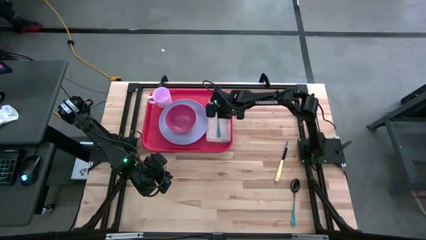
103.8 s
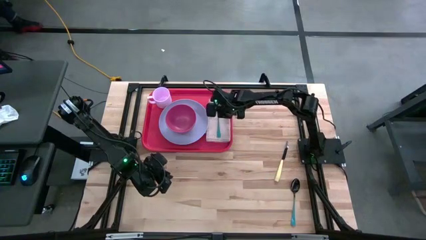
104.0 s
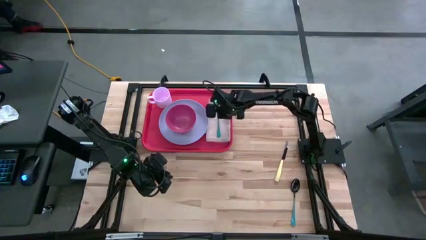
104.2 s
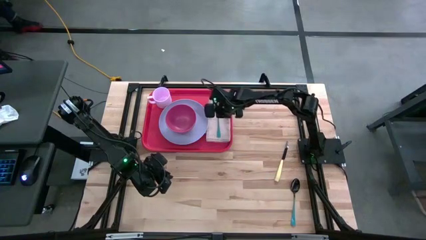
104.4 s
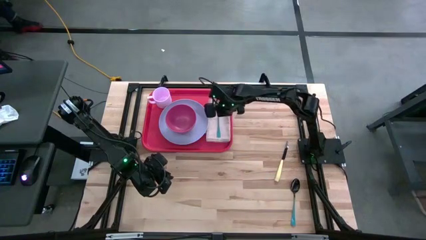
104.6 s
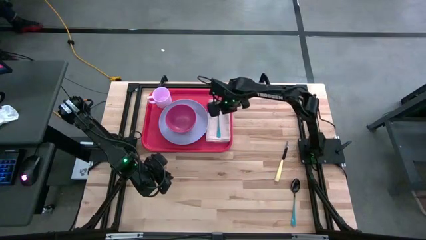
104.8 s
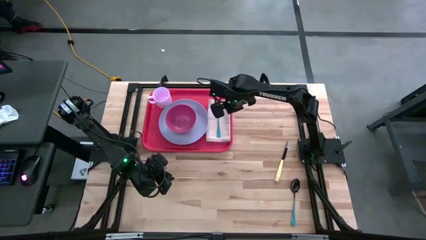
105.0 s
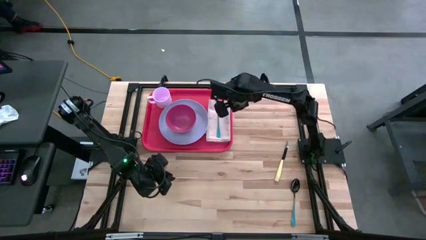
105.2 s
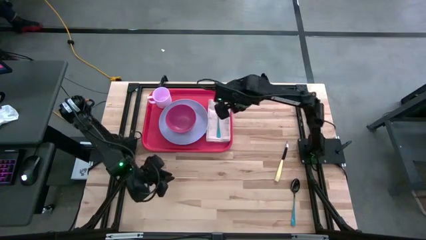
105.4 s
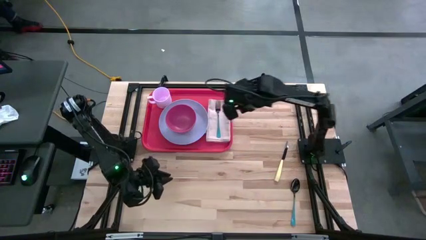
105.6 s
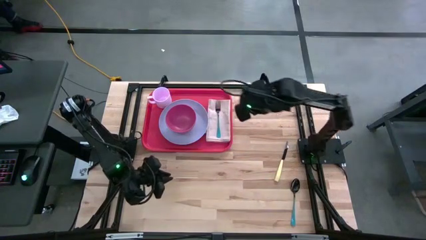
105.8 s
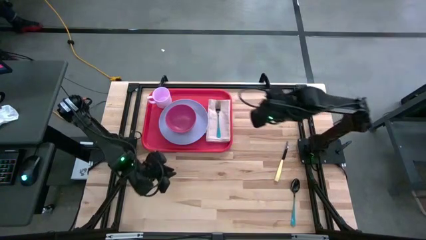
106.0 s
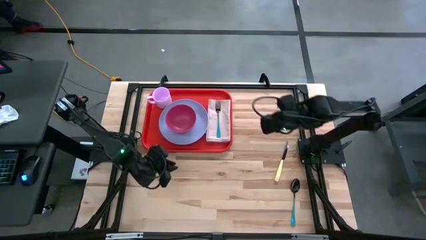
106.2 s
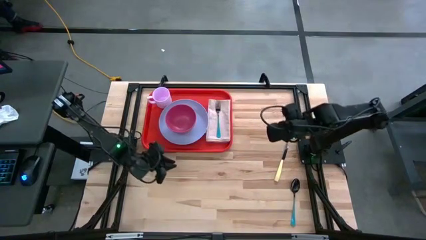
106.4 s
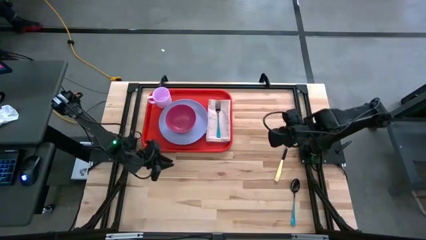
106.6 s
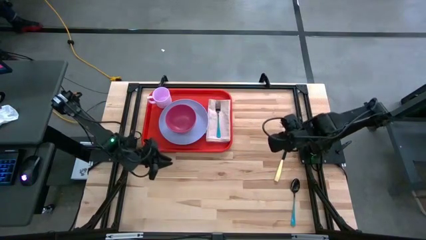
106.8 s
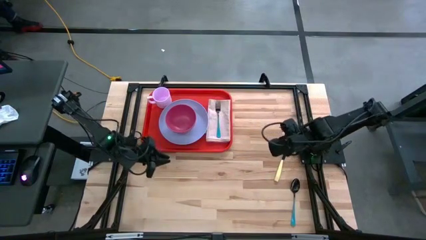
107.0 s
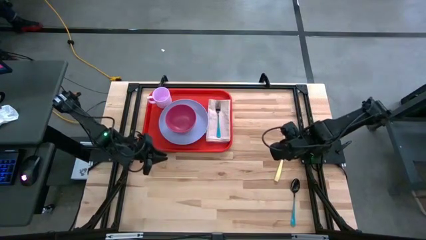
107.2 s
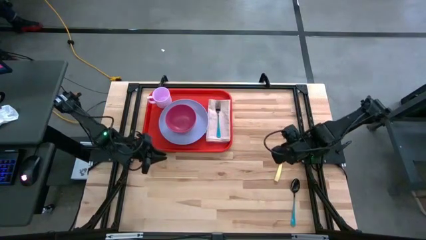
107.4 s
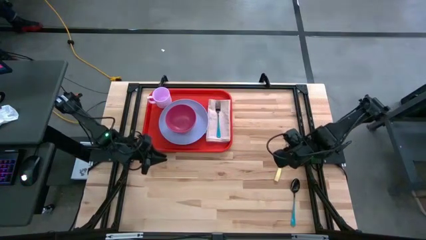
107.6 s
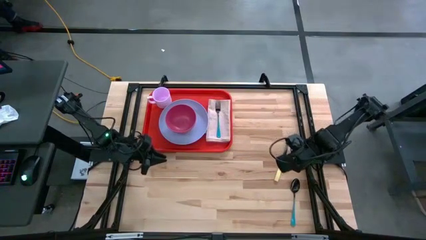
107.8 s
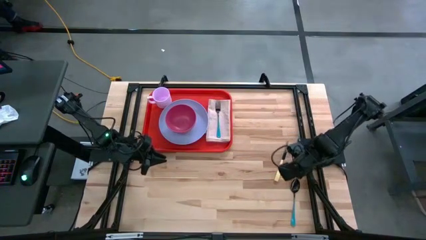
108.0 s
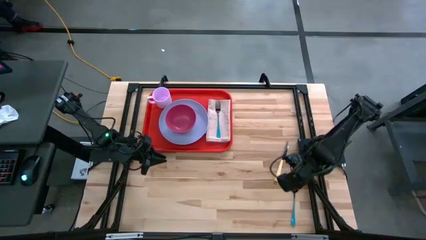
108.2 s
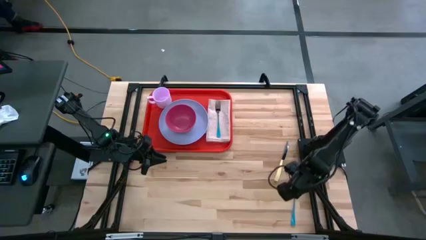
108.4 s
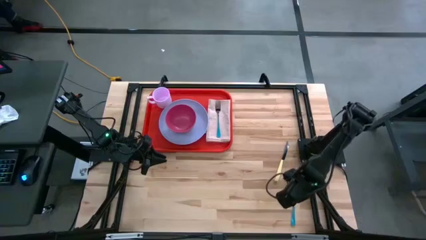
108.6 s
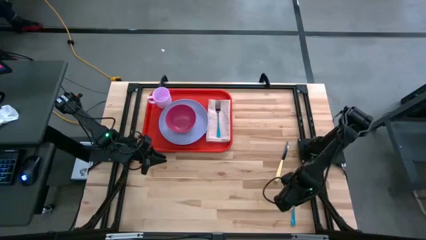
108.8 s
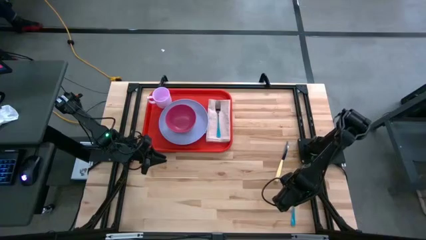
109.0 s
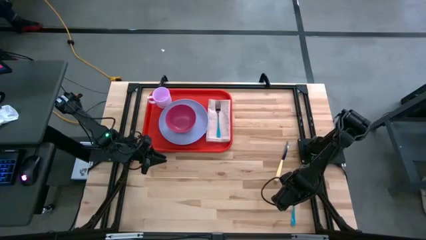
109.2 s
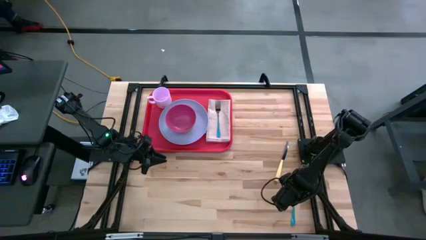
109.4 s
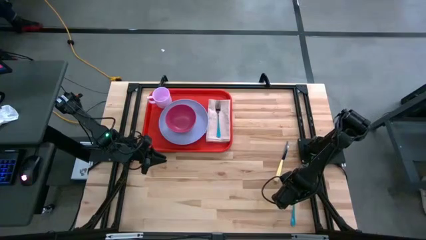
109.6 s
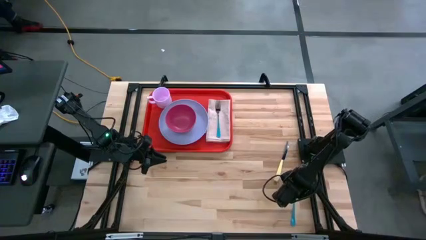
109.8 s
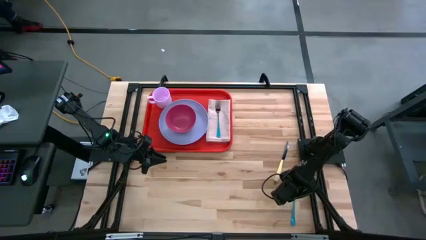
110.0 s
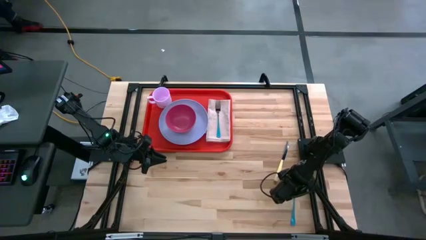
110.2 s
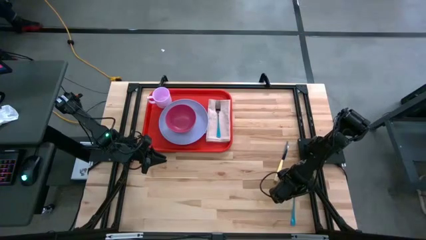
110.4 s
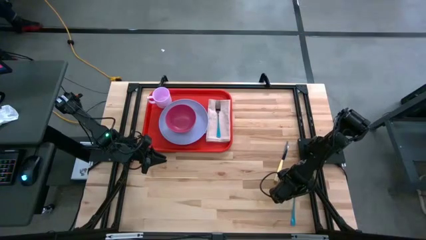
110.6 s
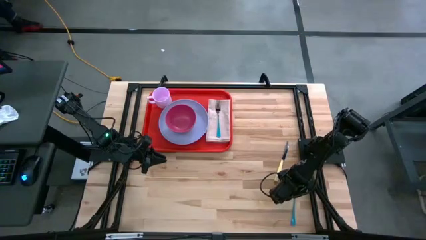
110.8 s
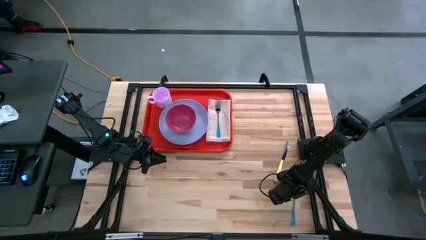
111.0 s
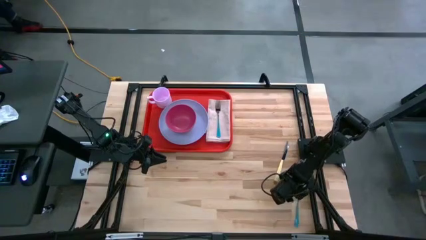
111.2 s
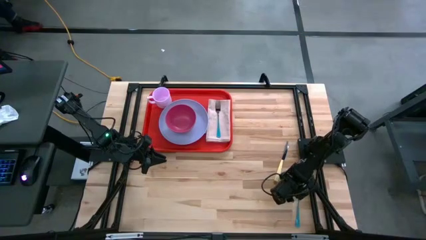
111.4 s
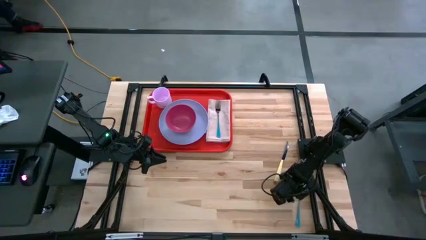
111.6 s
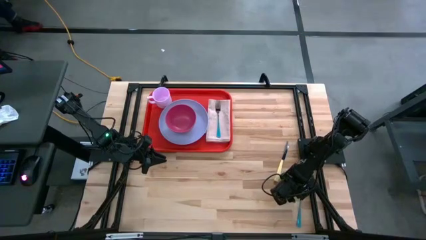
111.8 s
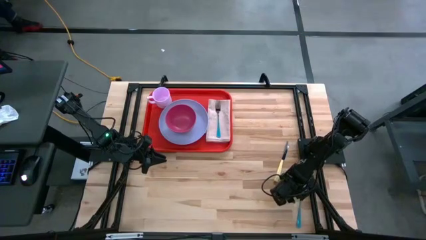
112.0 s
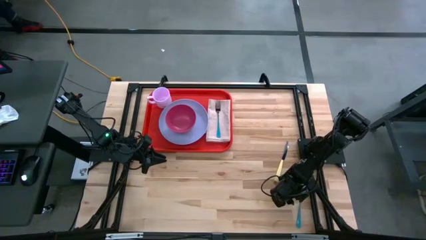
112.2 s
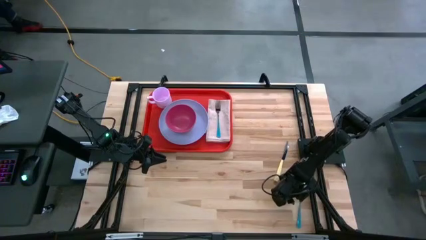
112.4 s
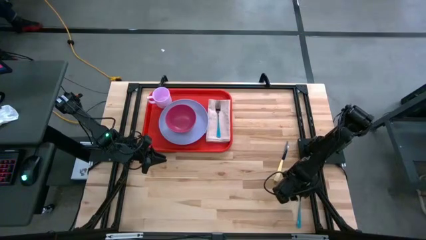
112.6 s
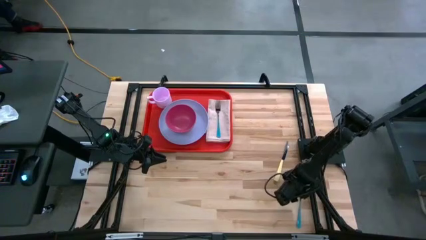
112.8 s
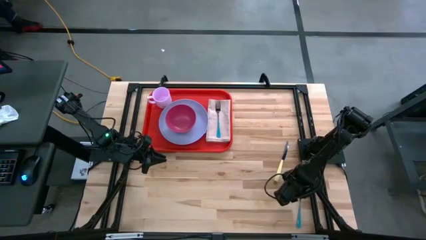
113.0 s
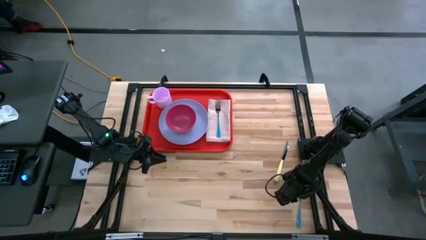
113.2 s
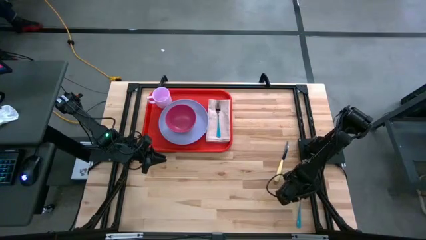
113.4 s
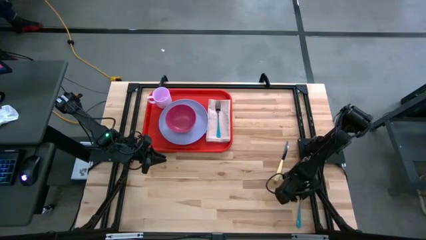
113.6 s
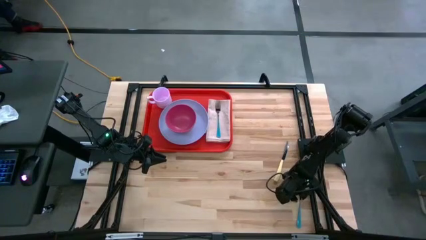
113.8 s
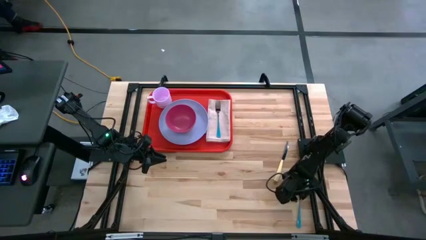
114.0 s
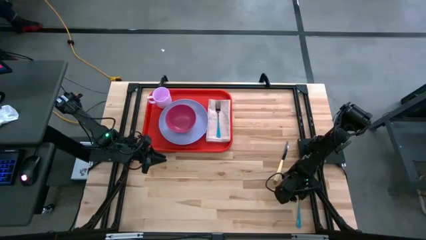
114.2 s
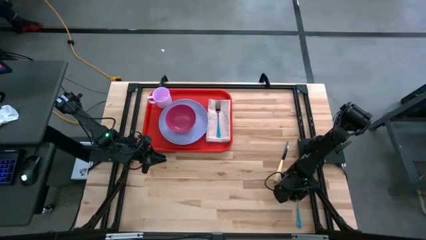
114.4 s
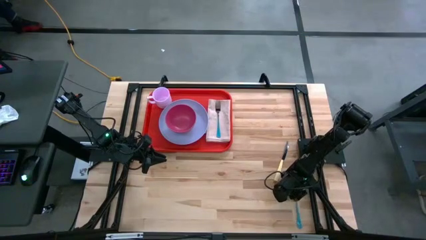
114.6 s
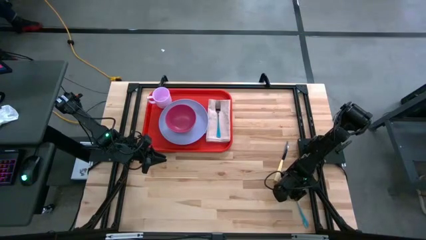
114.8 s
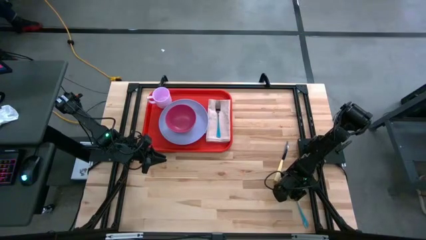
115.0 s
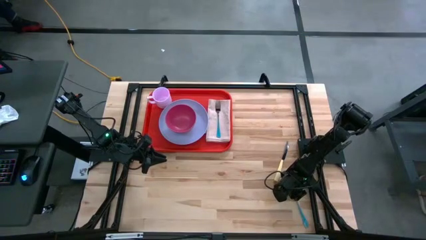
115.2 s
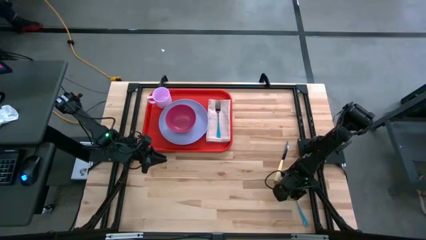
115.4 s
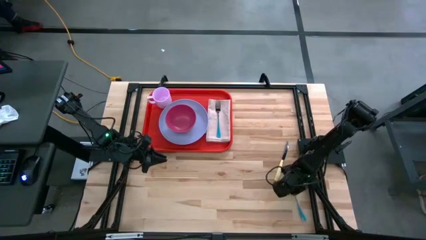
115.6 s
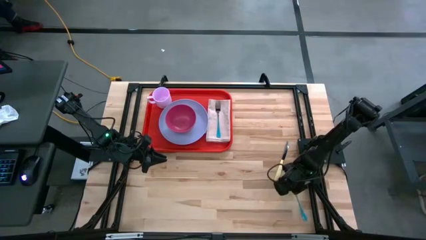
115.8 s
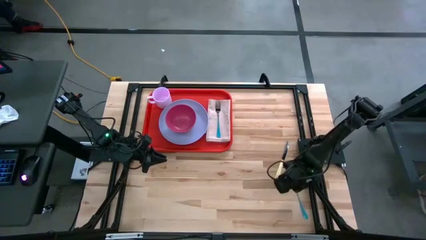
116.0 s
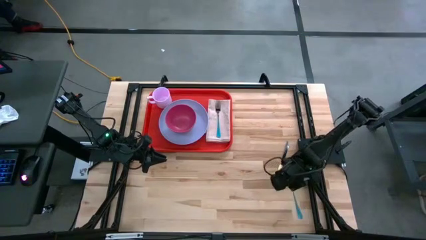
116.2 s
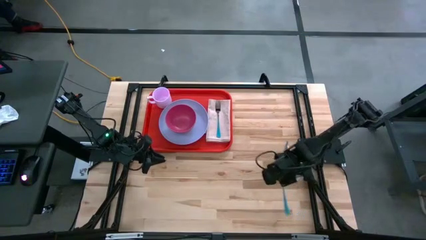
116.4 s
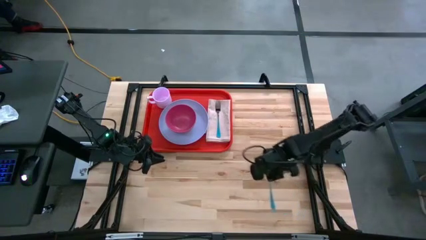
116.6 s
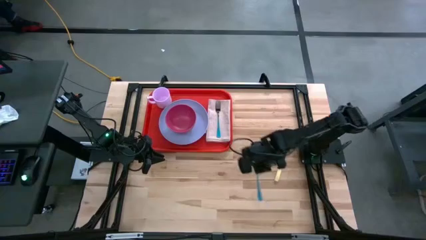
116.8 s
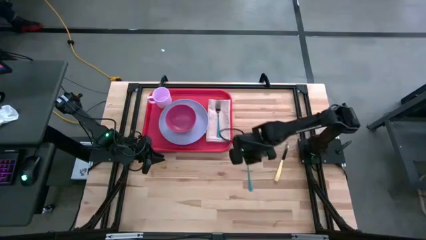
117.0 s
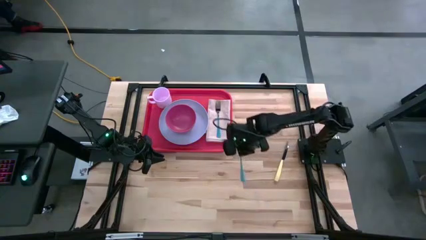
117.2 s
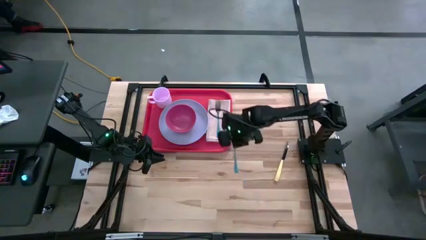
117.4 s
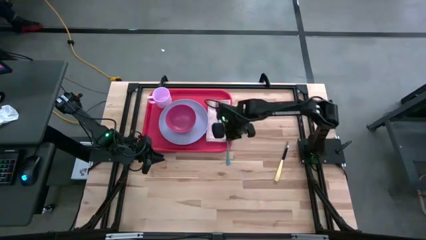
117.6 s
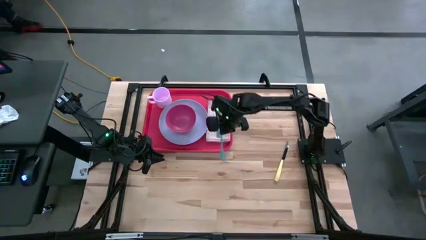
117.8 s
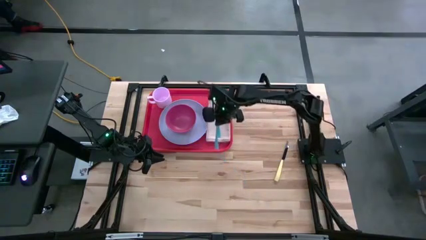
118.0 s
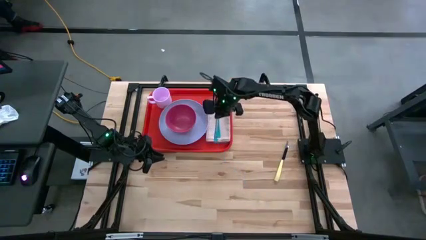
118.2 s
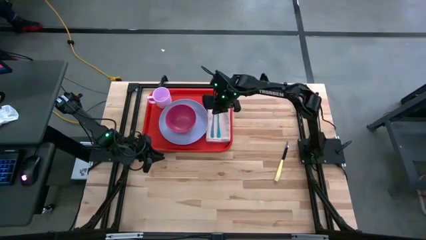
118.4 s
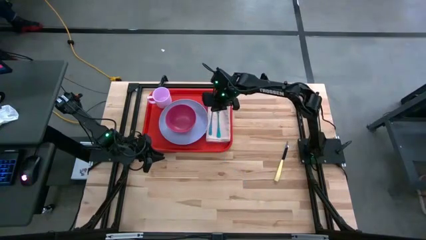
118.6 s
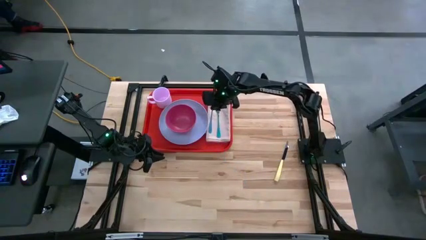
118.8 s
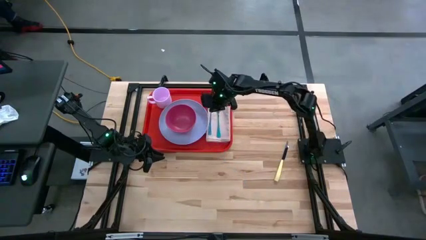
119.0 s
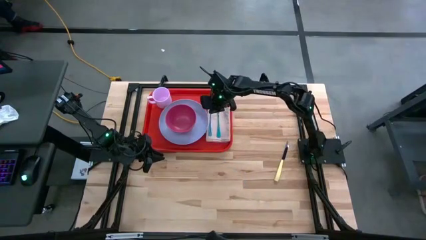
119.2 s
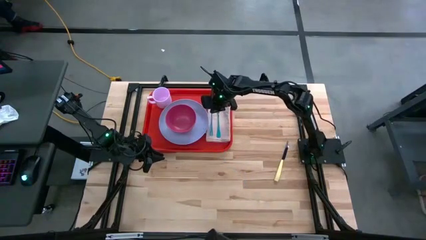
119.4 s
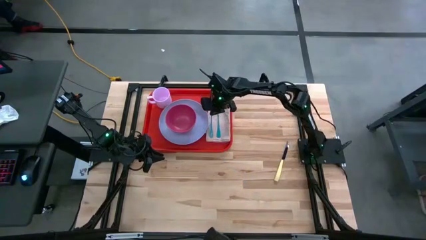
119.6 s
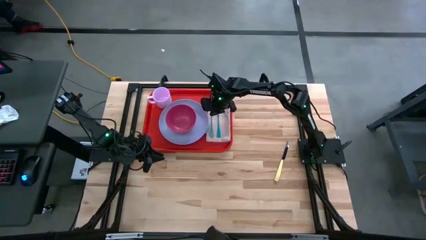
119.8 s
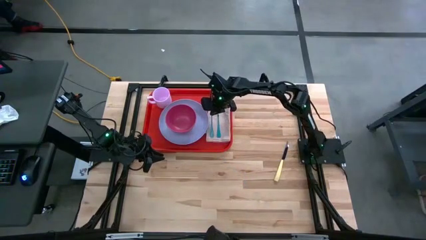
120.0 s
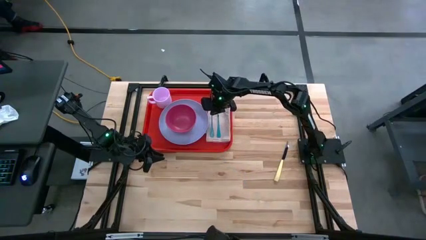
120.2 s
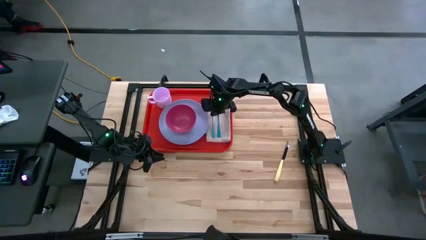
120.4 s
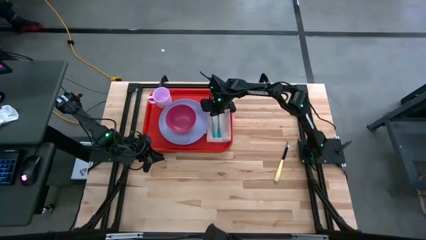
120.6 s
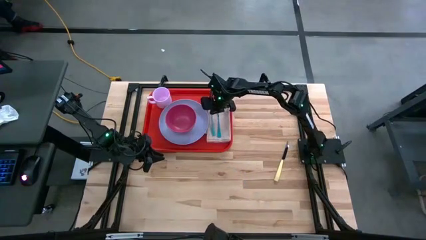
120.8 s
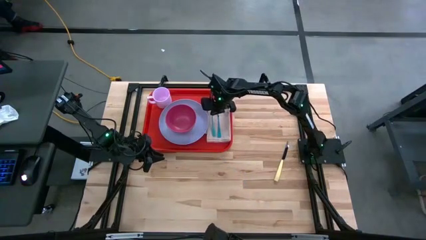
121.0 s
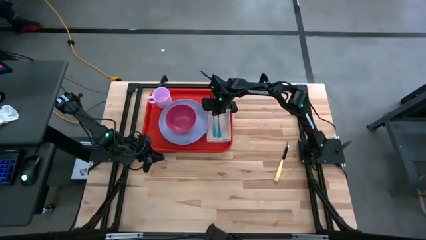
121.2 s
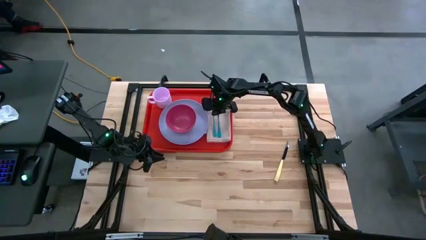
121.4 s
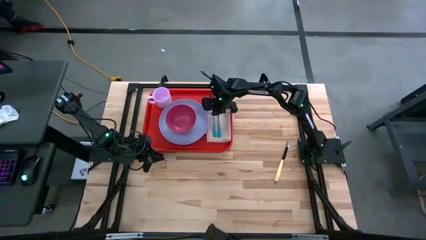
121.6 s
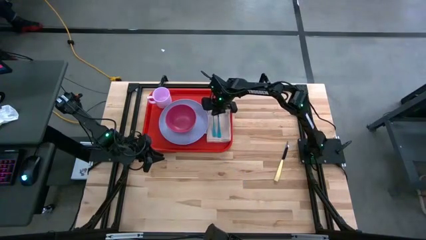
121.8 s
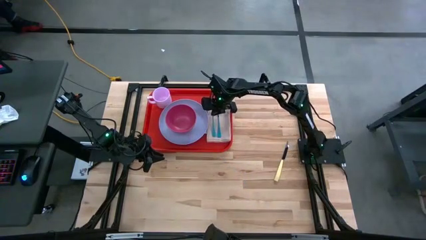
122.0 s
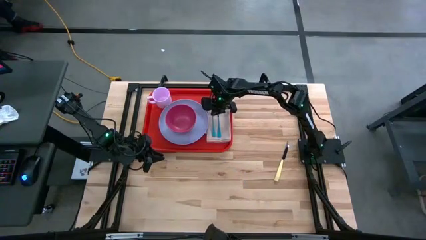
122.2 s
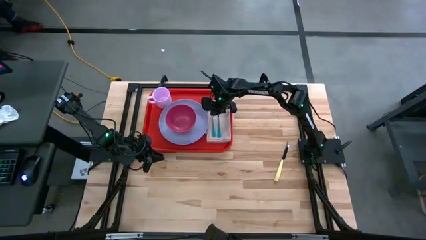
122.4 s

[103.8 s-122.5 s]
Task: Set up tray
Put the blue spoon on the brown napkin beside the blue fork on the red tray
